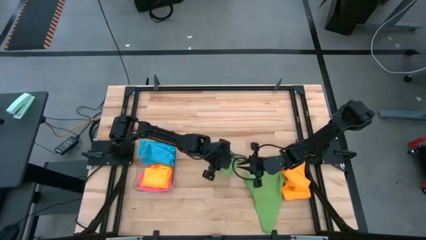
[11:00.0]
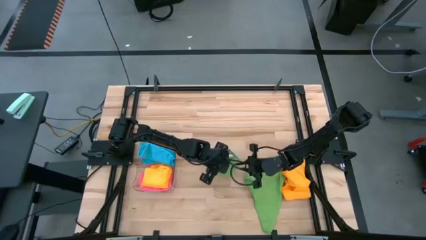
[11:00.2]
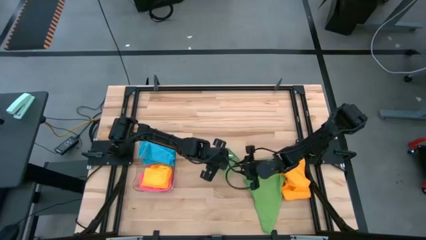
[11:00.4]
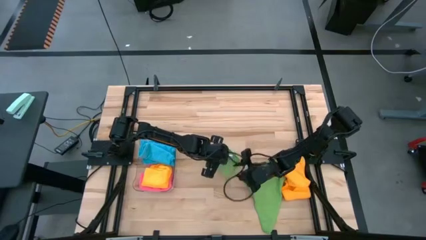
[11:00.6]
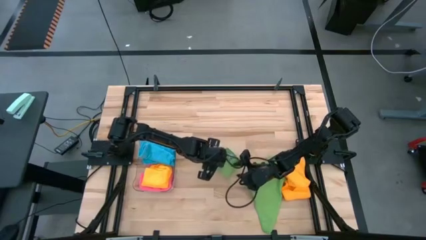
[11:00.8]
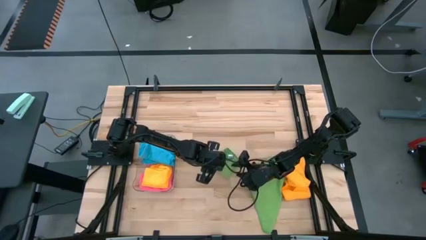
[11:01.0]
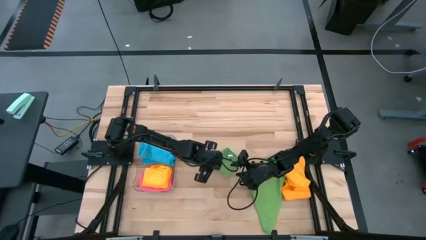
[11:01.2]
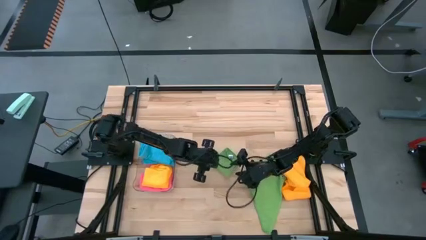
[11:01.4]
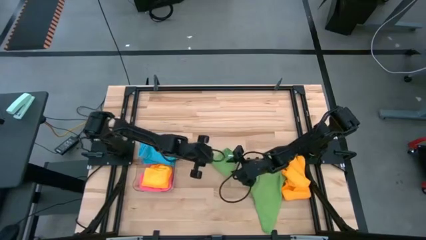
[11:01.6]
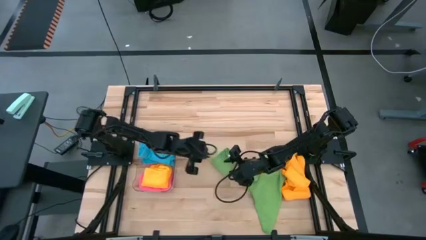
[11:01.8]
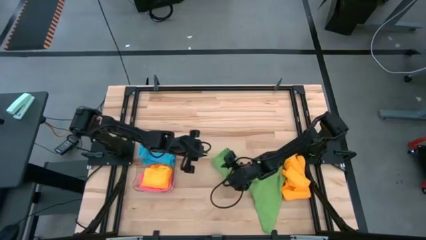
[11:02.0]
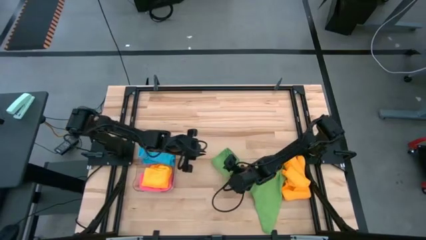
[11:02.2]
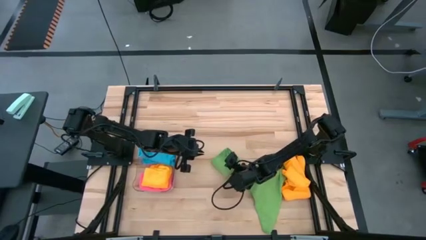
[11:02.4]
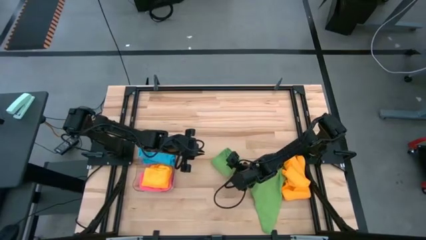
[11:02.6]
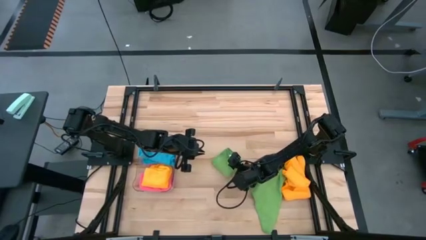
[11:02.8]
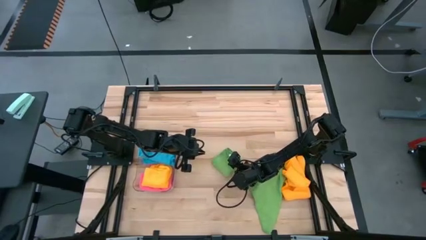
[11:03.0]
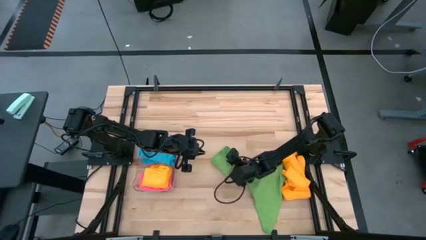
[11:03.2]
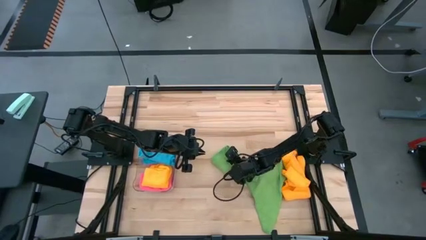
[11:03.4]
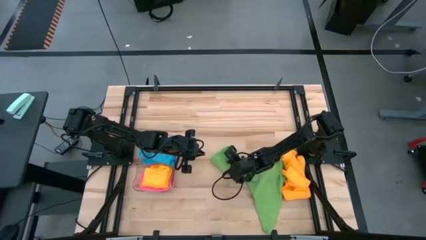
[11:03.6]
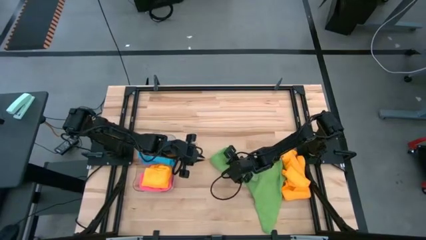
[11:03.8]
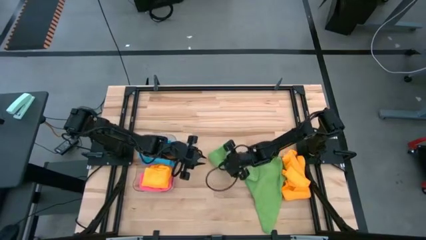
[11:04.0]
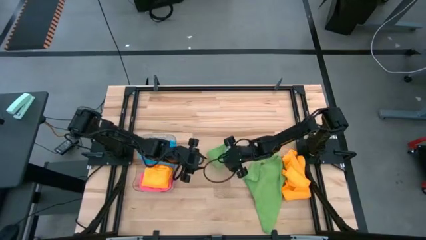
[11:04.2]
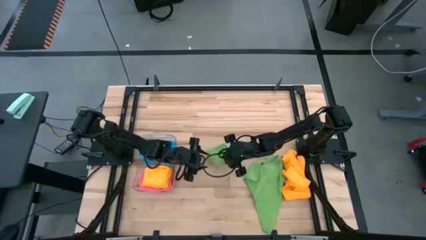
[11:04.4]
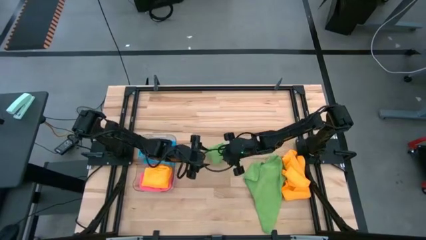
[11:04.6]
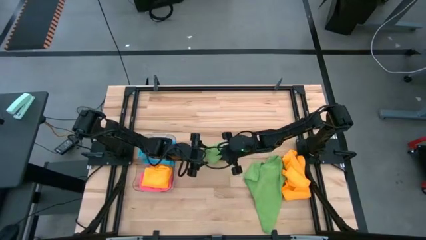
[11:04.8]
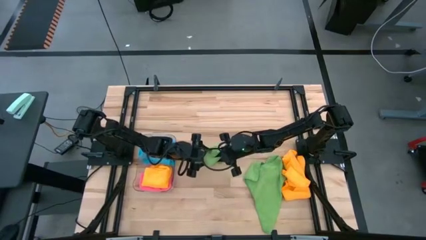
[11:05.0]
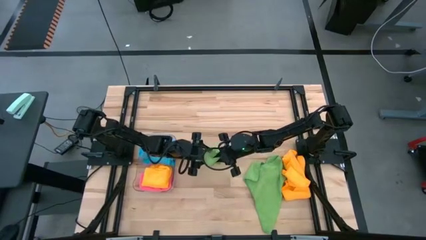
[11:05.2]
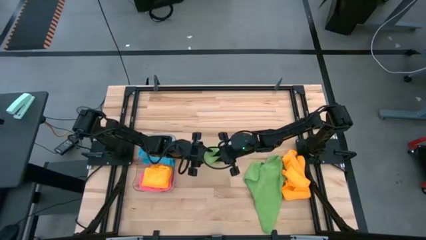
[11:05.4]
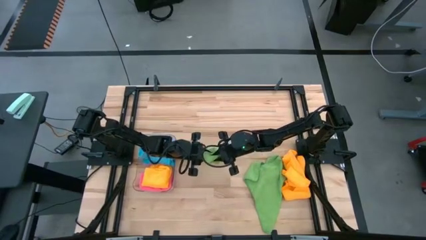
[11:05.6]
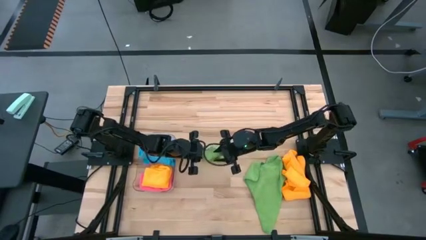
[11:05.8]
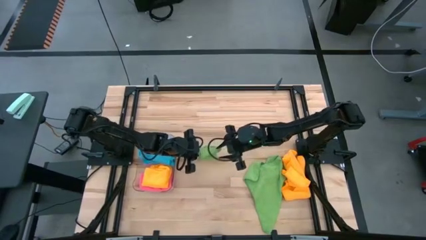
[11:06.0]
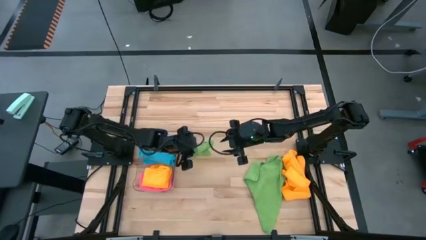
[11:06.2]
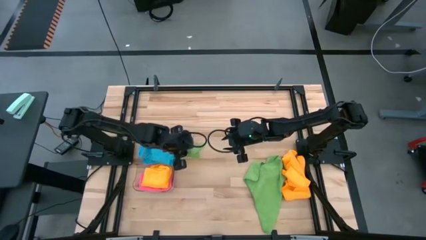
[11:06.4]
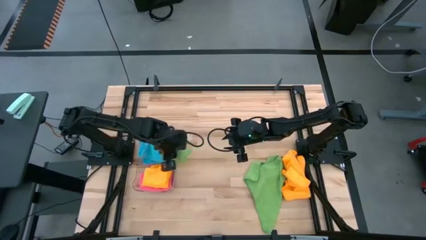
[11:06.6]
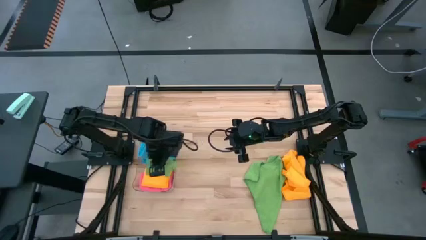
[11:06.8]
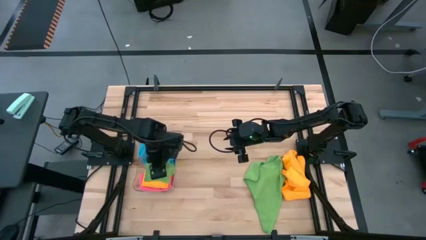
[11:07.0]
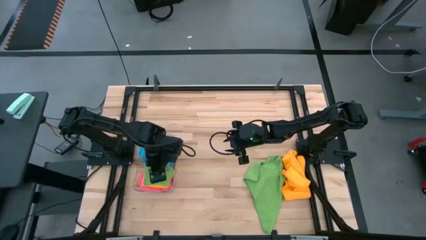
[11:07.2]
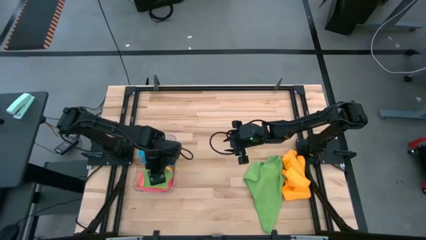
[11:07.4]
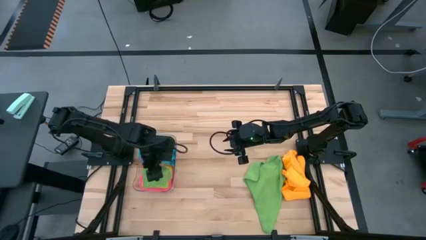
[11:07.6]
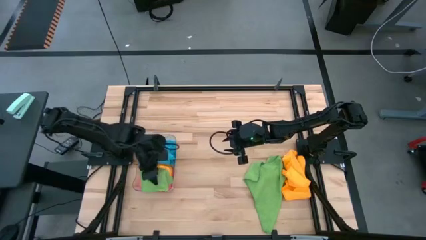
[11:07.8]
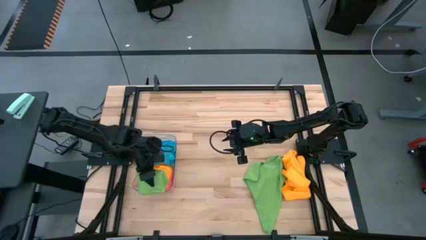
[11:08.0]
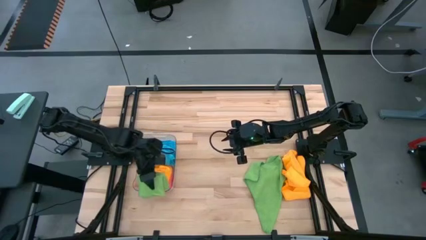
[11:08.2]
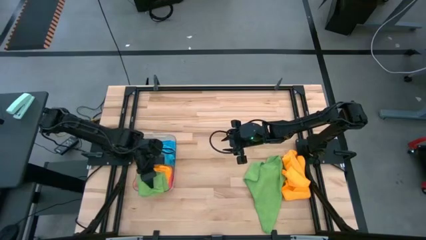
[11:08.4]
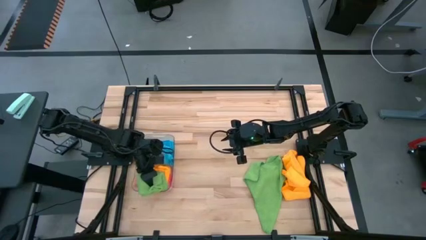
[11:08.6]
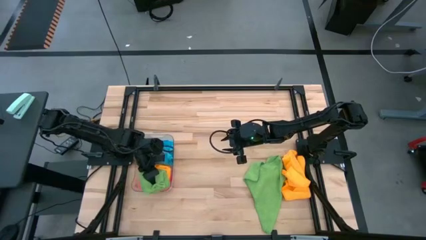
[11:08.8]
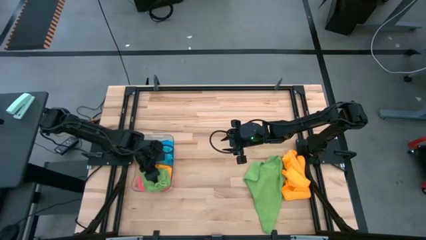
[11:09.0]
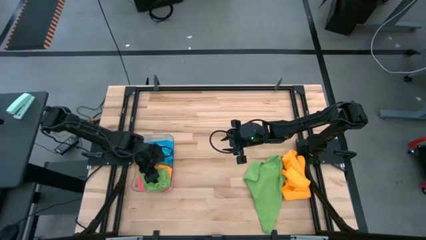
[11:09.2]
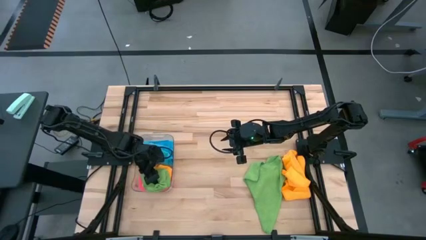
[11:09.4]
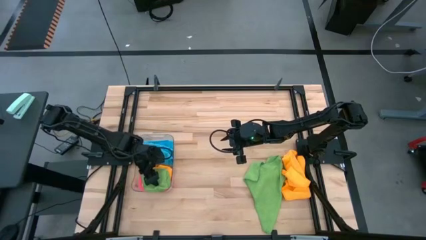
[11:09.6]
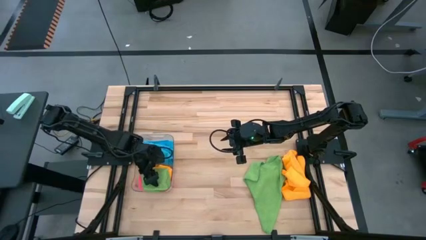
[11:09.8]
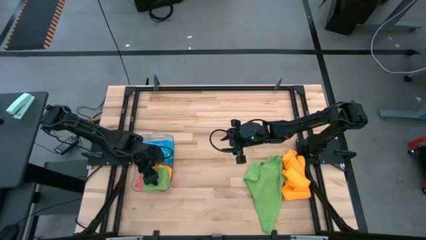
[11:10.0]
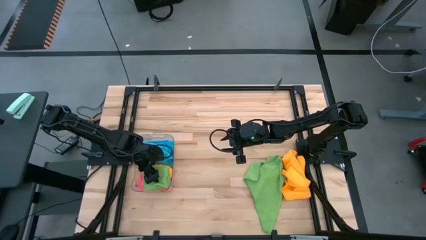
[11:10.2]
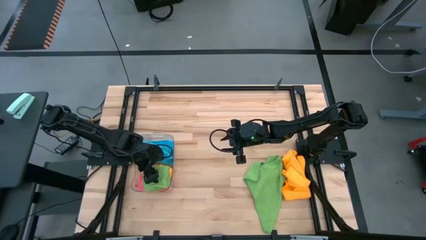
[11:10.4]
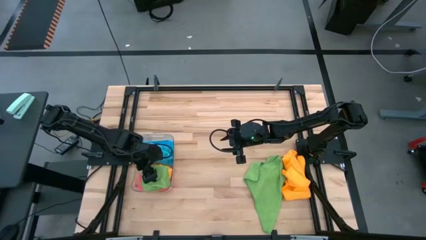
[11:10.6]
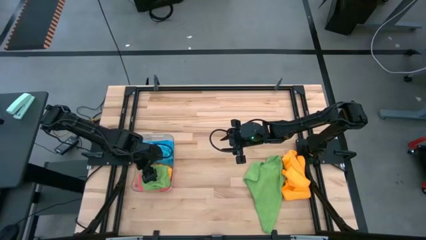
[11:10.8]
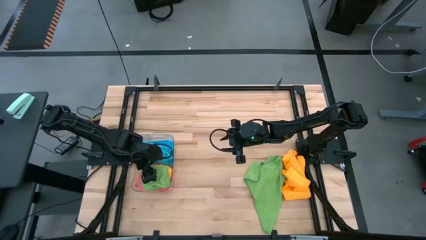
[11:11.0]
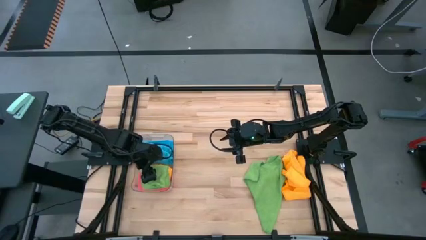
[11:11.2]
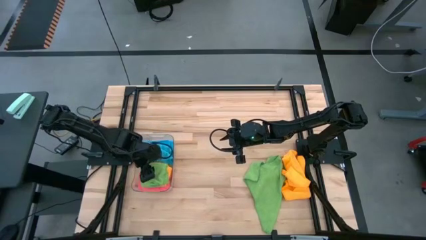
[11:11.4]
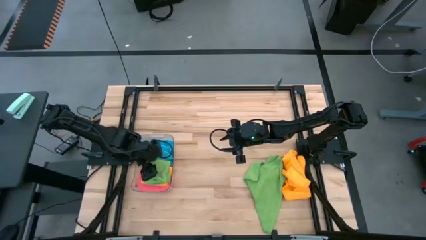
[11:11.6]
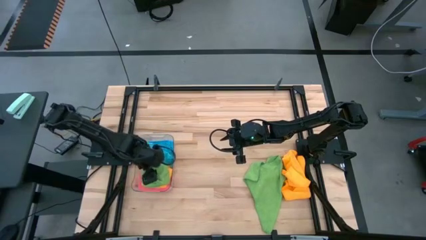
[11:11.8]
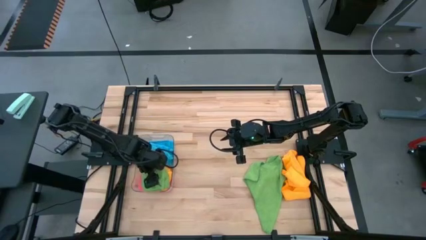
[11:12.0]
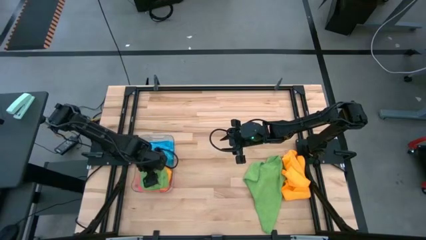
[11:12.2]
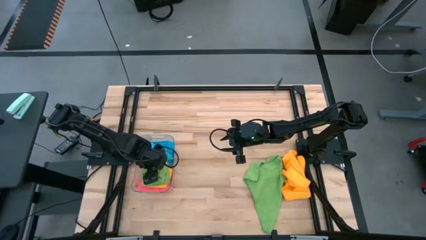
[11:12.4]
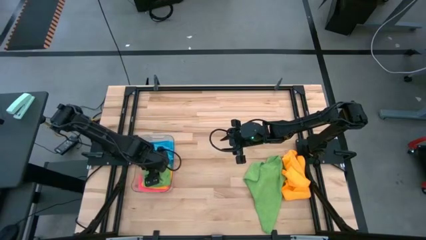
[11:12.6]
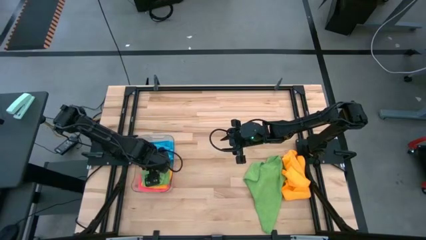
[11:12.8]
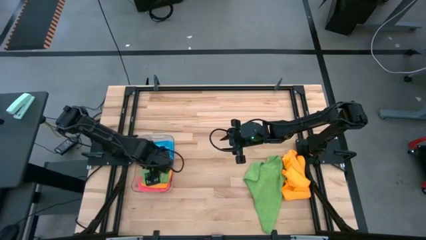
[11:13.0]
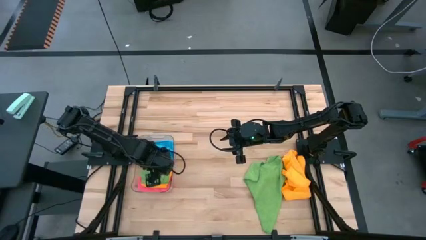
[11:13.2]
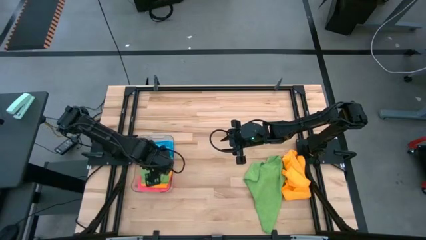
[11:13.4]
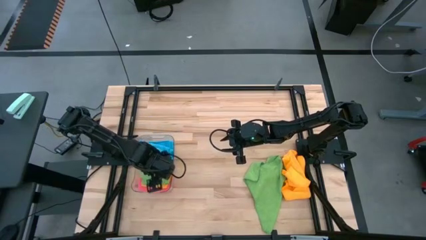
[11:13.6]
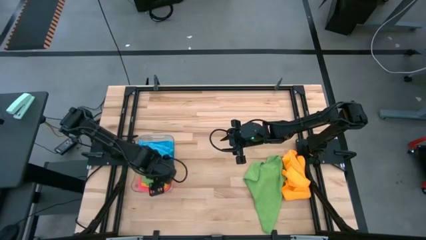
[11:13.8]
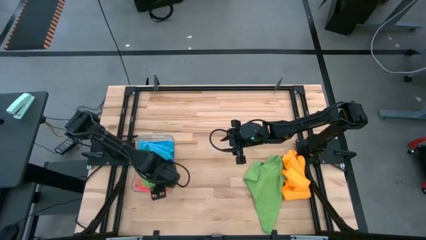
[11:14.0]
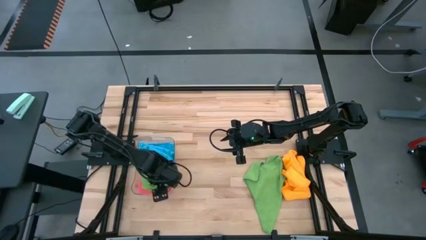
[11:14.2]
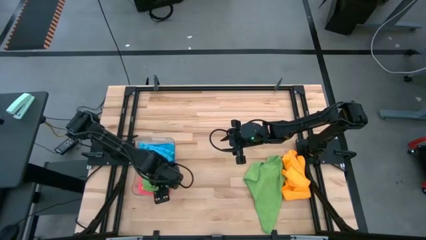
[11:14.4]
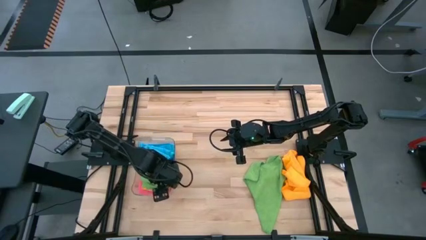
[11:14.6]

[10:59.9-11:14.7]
Task: Fold microfiber towels
Put the left green microfiber cloth into the transparent bin
